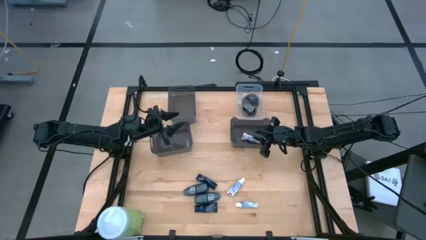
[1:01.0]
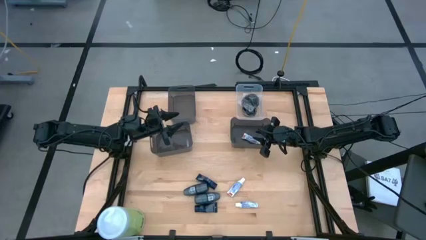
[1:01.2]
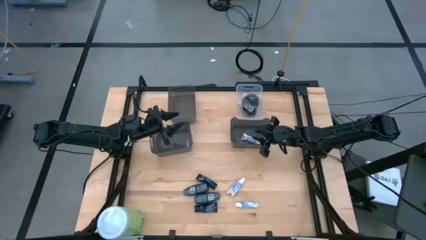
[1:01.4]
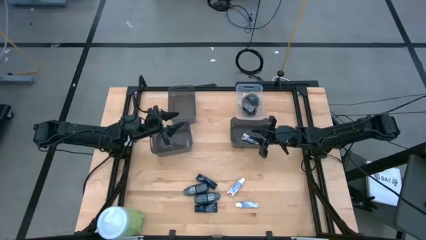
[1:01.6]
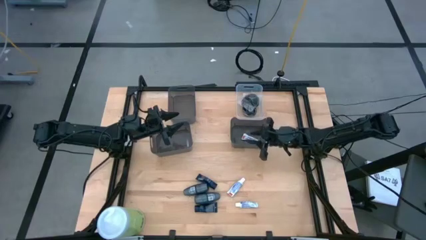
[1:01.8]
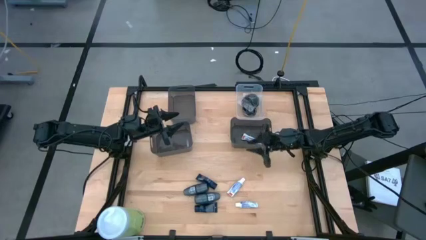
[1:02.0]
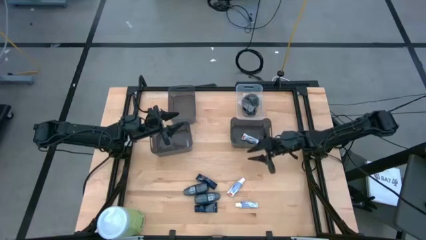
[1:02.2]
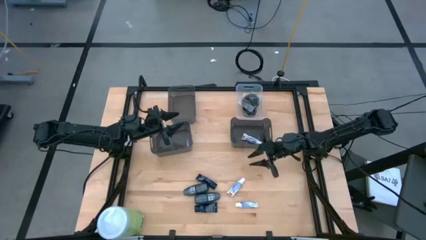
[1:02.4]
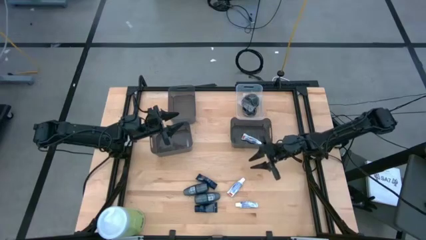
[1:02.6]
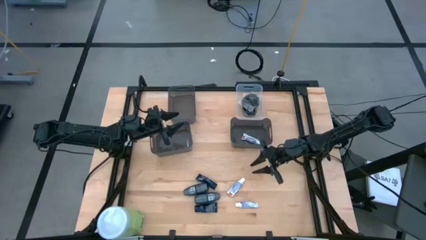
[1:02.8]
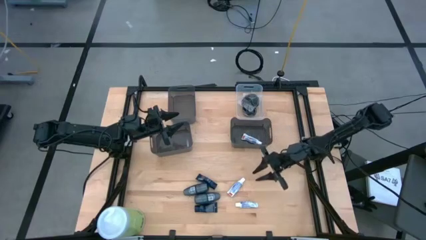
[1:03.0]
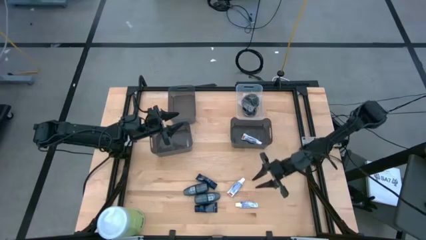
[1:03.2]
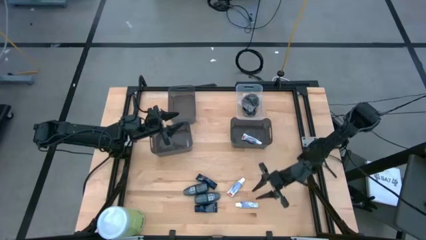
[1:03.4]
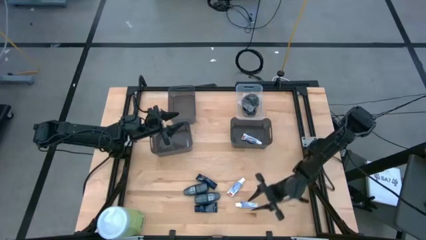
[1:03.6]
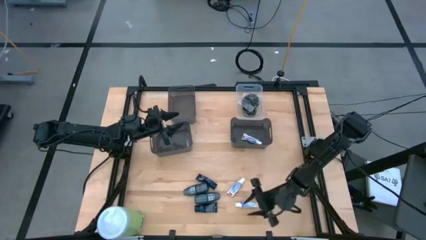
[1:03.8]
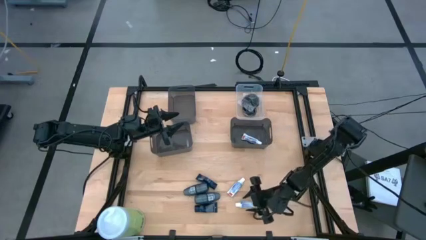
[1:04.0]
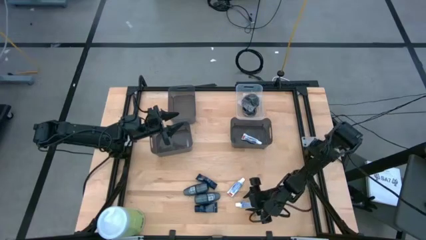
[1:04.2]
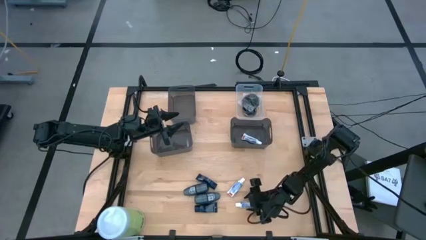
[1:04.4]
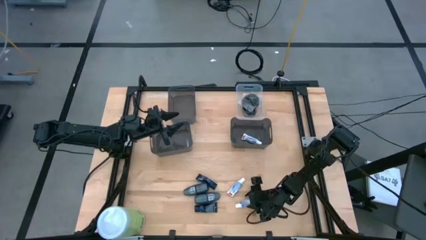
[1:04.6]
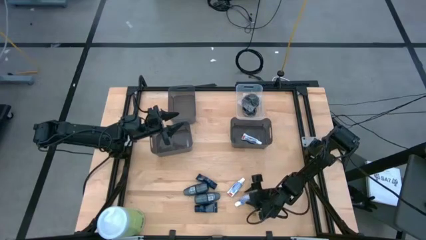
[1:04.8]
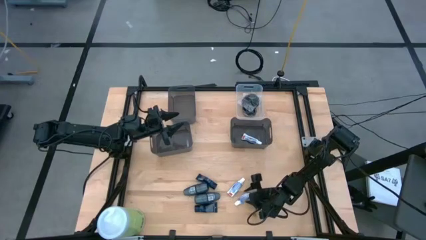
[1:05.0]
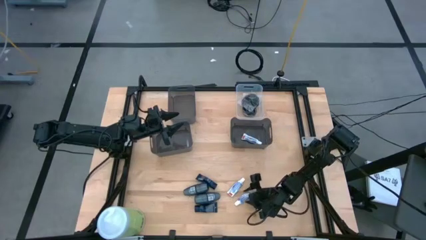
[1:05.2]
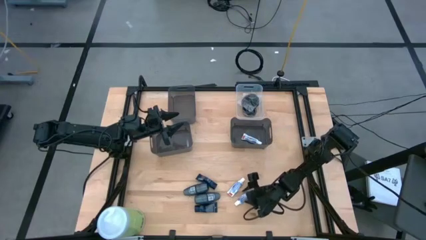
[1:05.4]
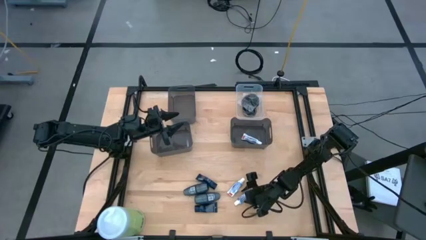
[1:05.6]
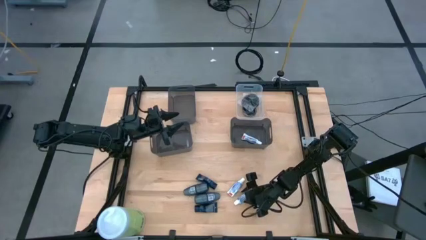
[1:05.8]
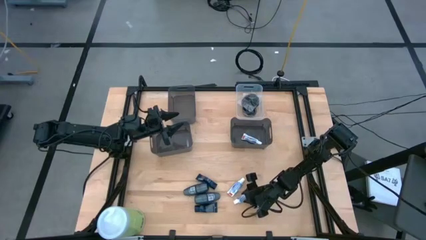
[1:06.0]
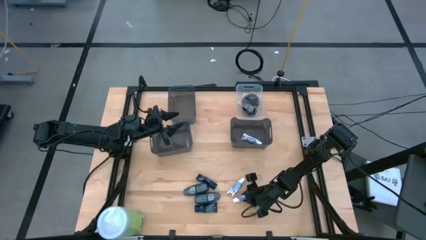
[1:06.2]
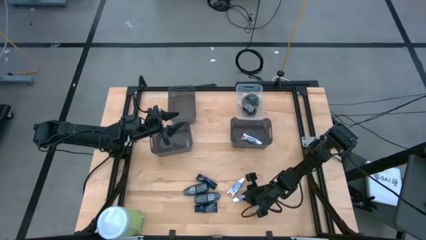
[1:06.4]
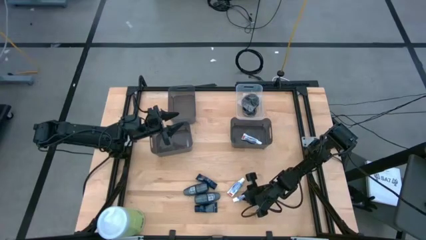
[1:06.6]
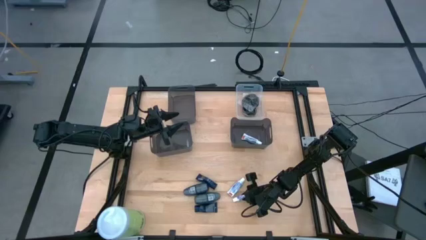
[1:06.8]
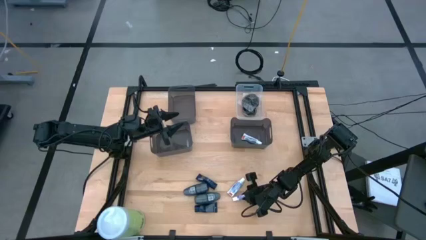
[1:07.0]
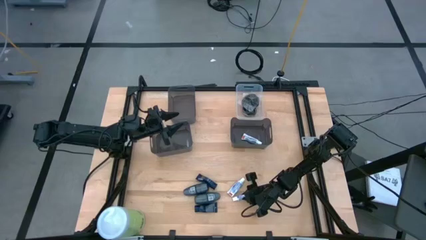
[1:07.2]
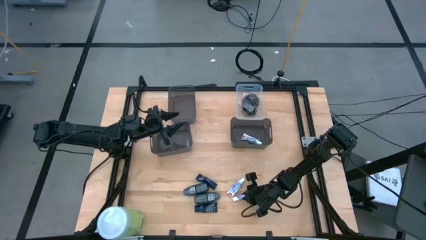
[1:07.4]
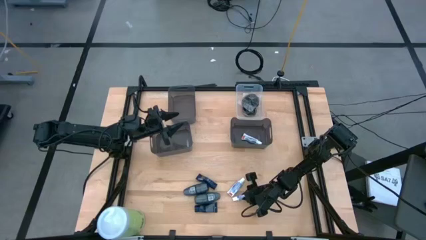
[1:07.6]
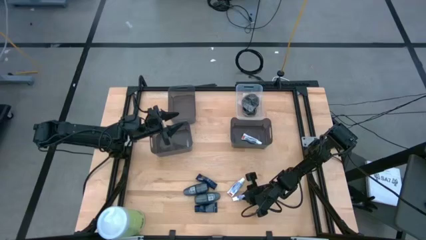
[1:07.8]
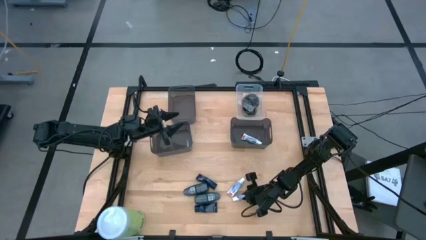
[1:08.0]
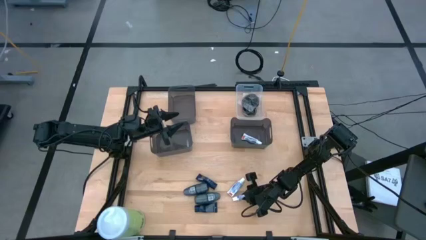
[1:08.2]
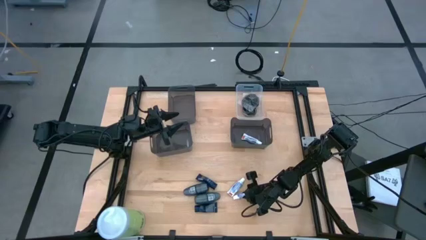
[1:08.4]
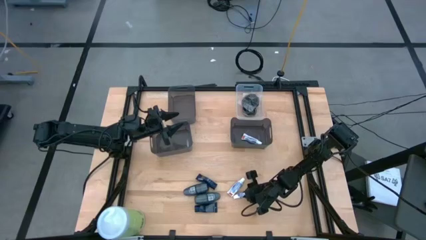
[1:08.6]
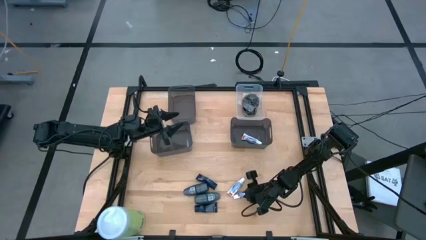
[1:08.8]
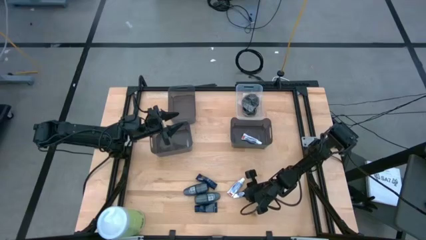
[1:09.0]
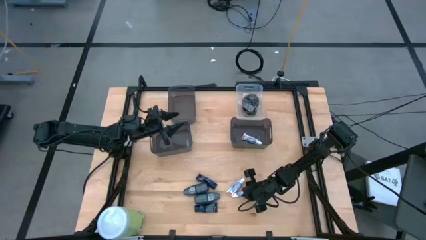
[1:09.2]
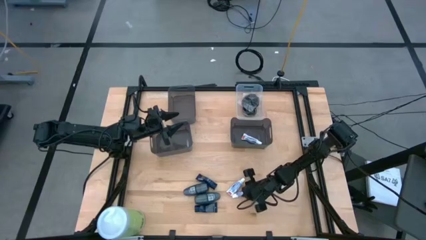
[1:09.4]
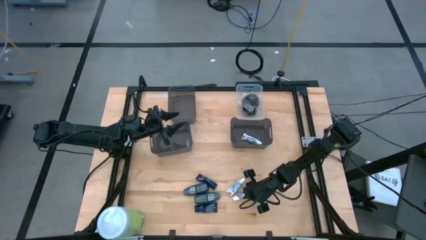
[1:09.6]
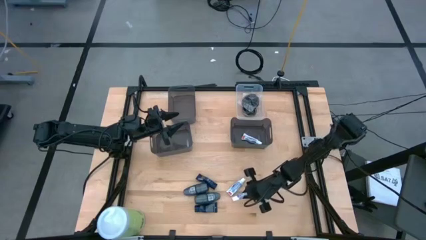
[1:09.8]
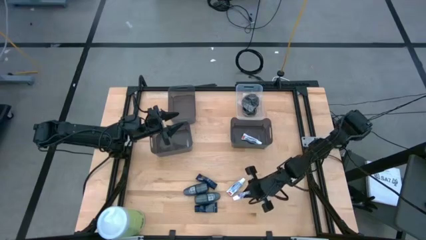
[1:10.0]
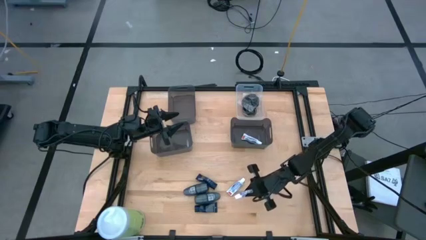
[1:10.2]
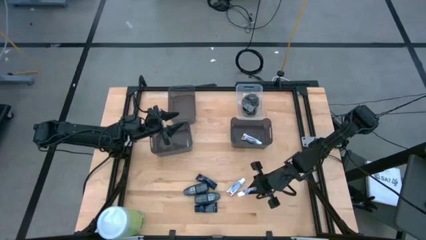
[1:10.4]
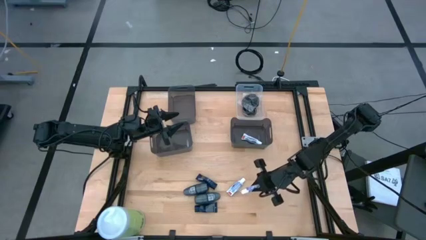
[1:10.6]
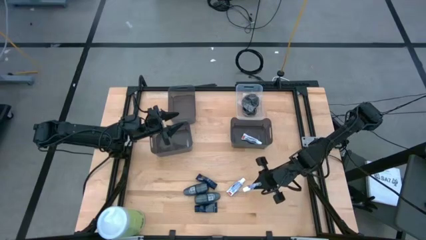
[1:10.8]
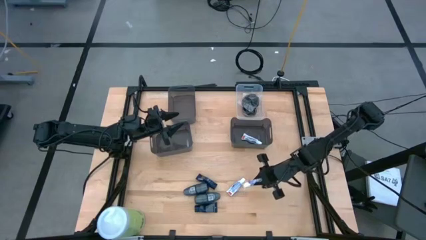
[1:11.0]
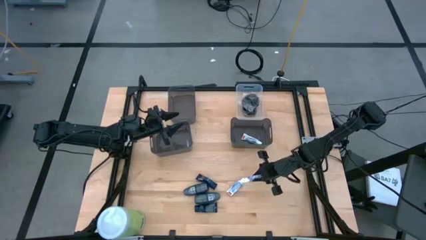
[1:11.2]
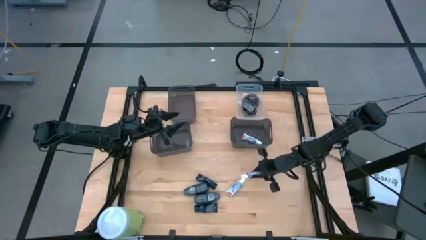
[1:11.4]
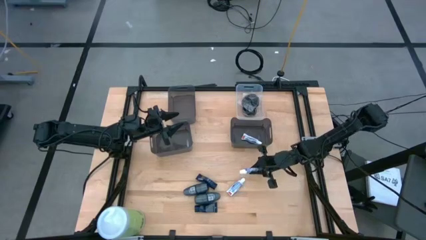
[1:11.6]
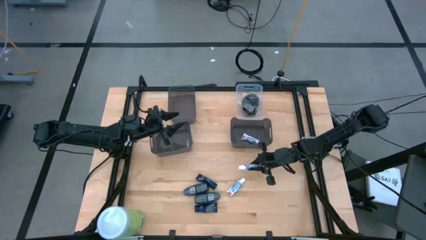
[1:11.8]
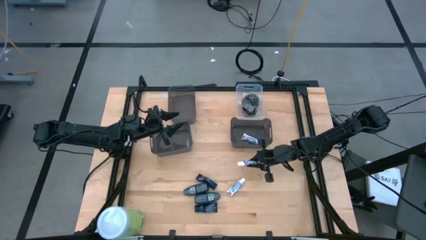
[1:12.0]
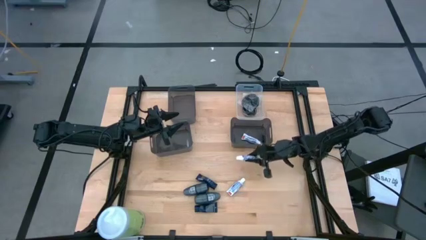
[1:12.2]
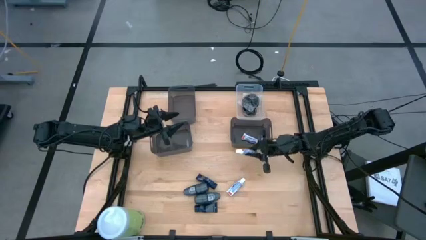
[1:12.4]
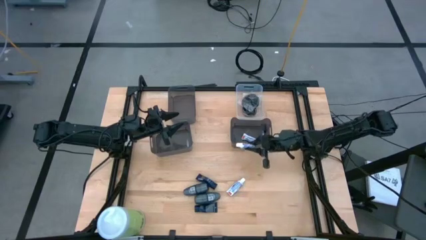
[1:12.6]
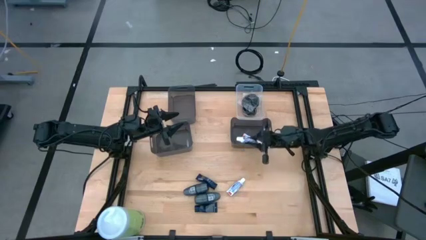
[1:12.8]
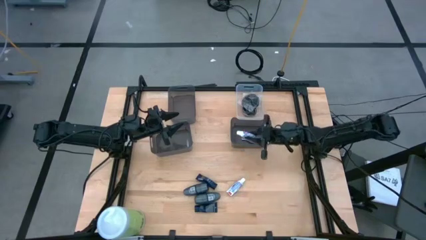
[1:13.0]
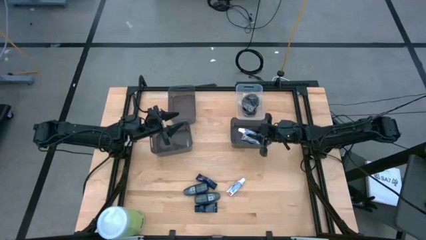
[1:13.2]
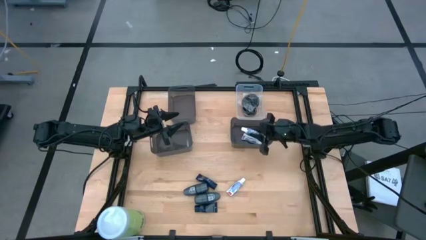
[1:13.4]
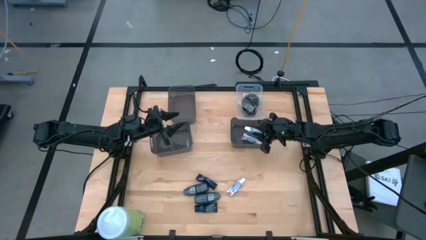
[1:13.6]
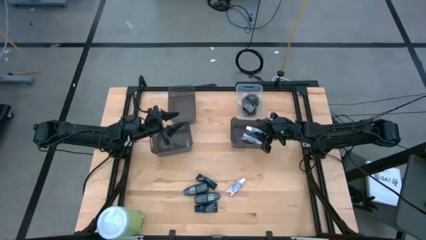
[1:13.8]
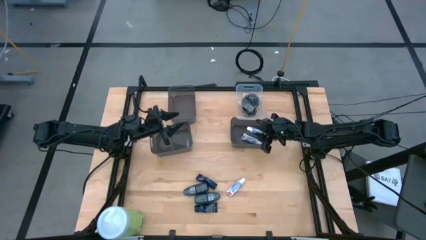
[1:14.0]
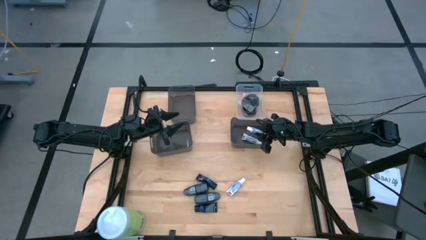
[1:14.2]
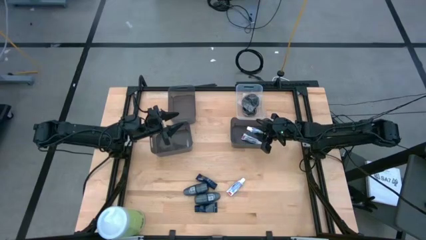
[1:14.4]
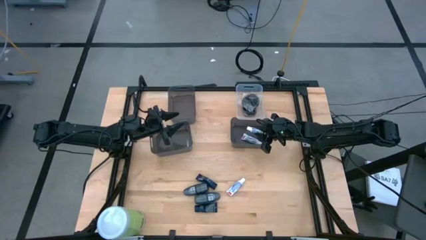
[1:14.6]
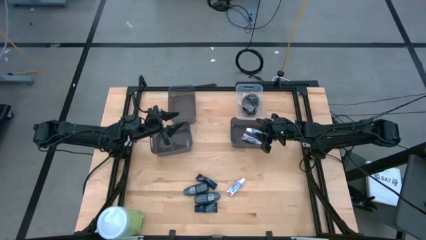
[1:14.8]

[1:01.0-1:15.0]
Task: Pick & Place Travel size toiletries
Put the bottom white toothpaste into the bottom right black bin
